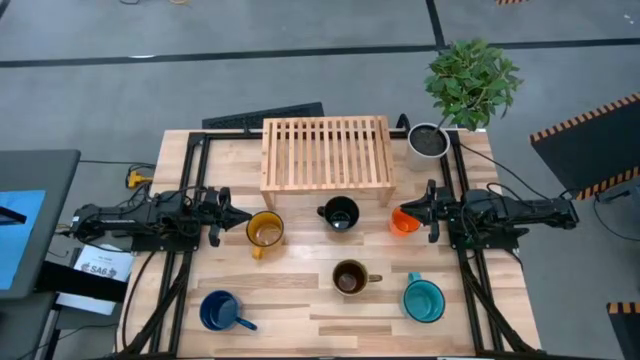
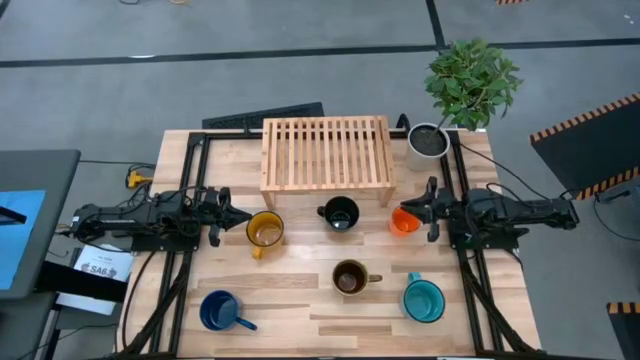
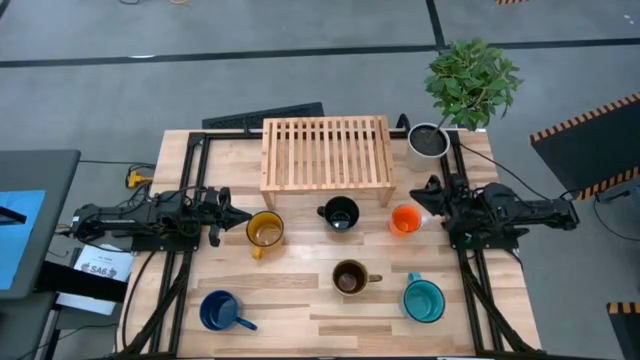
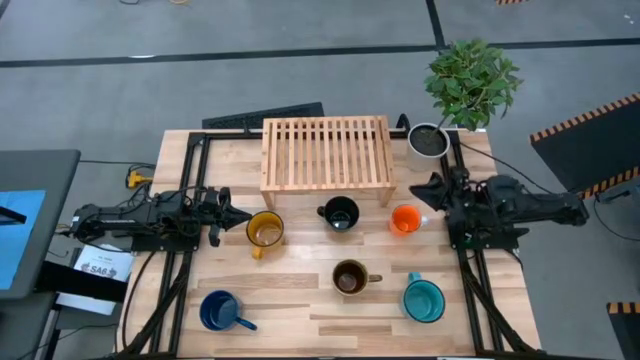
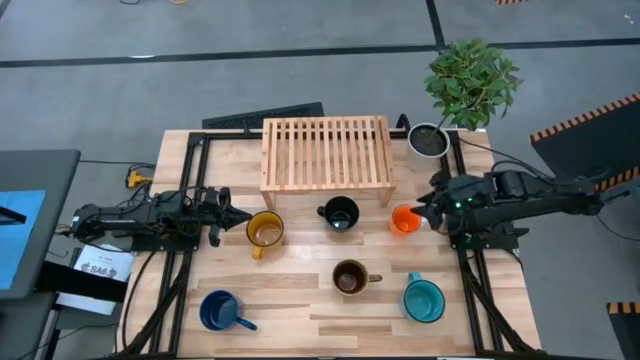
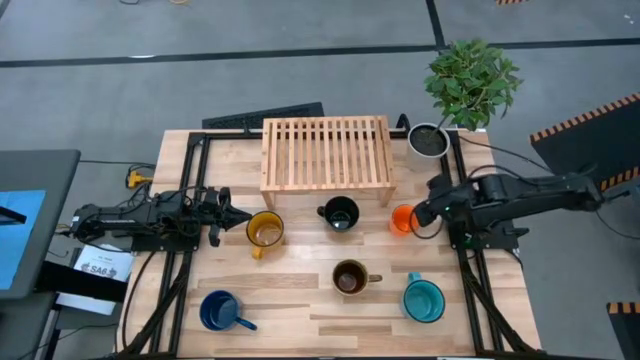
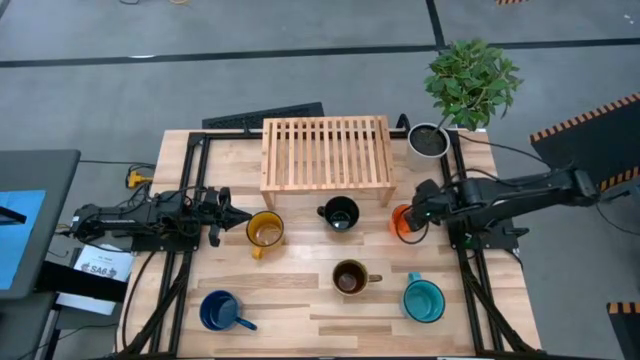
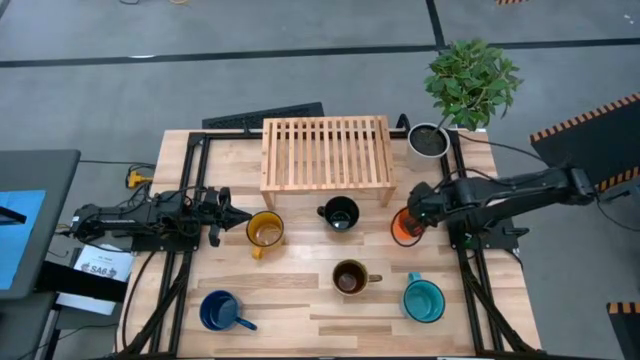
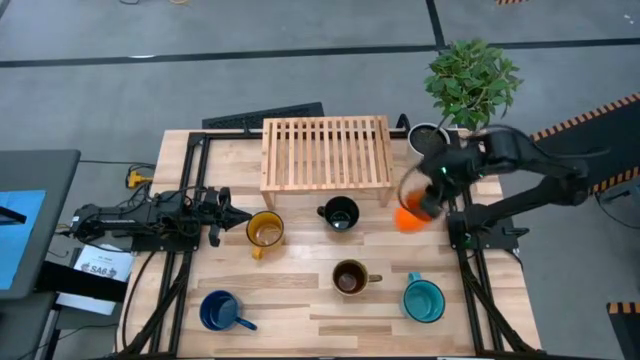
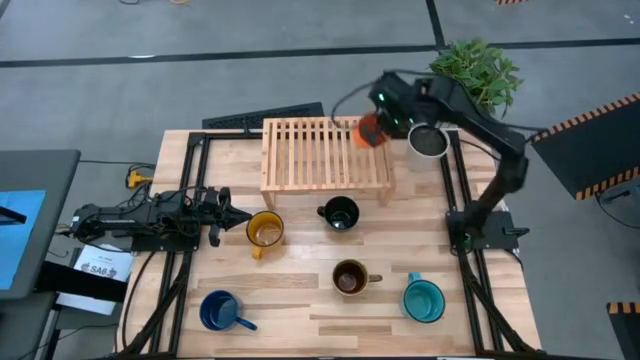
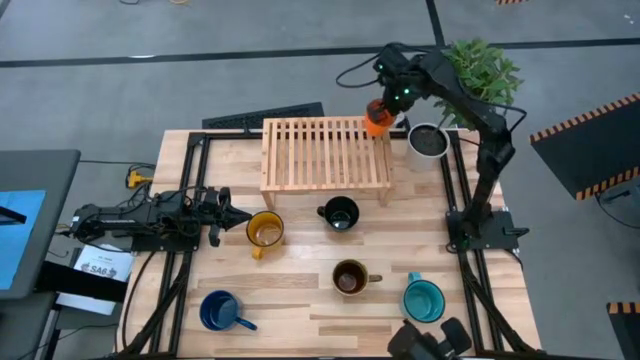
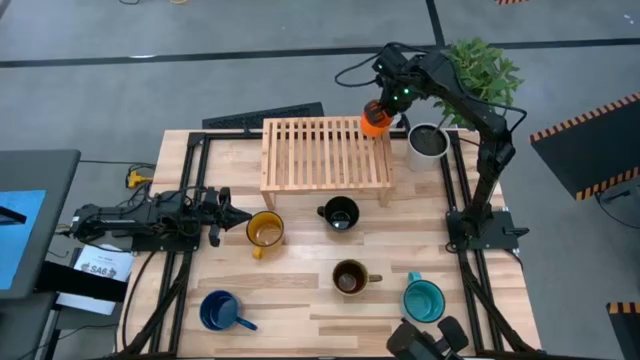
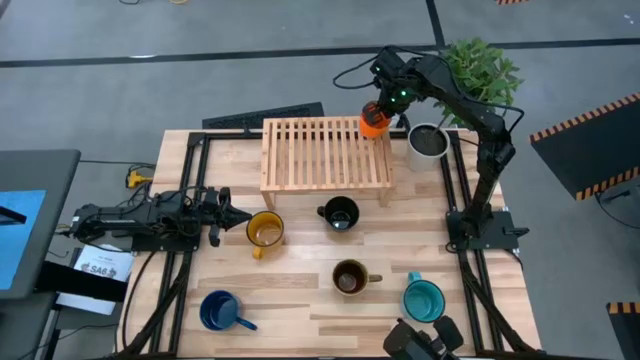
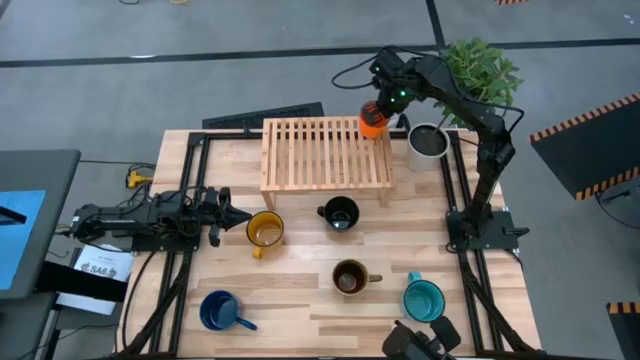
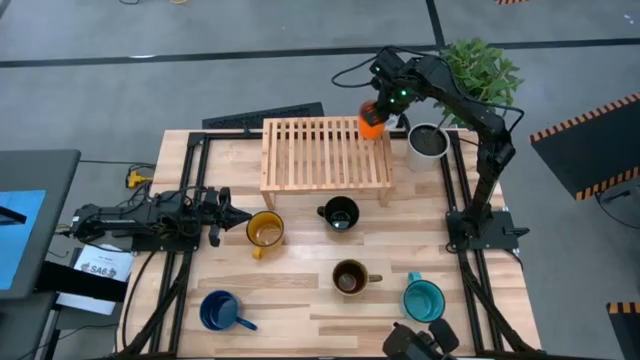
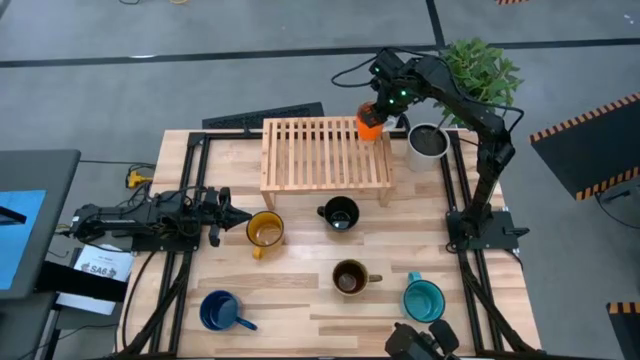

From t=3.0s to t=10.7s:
Task: Place coffee mugs
Put the orange mug on the shelf

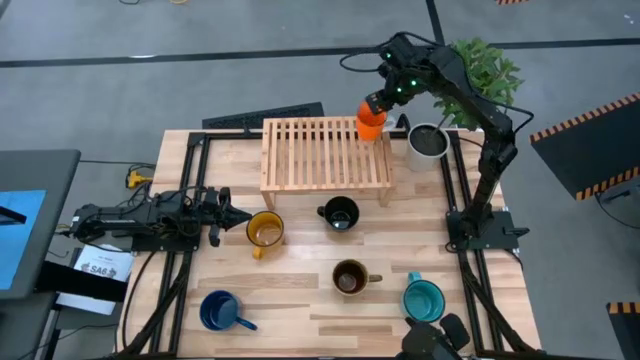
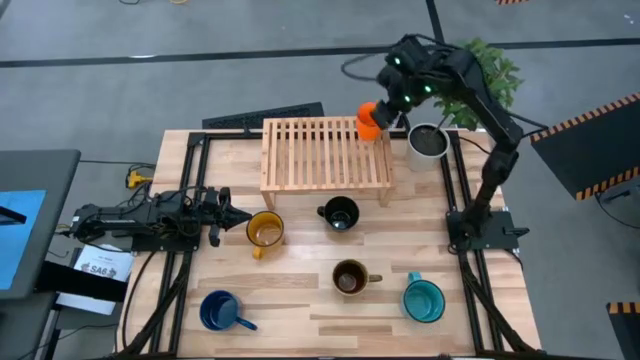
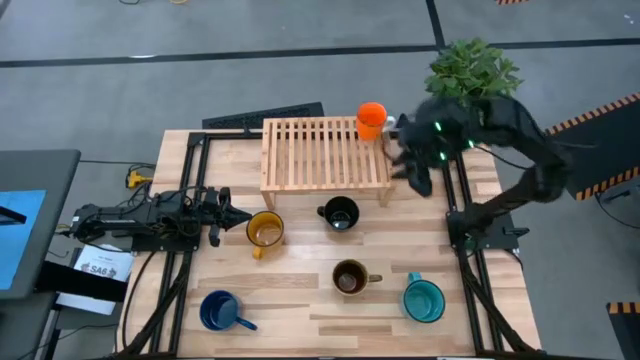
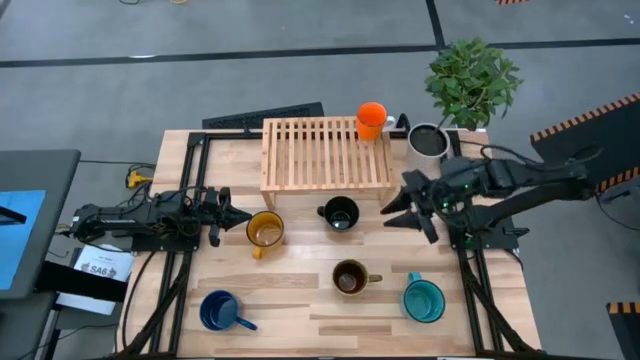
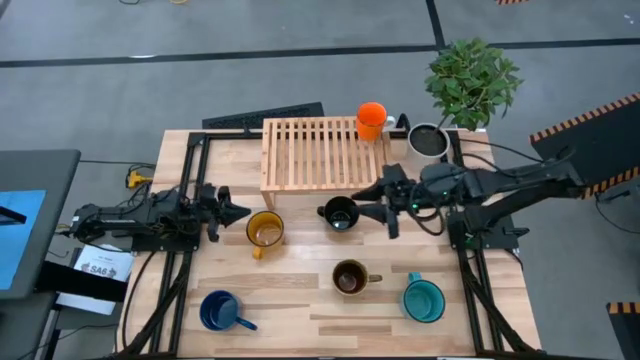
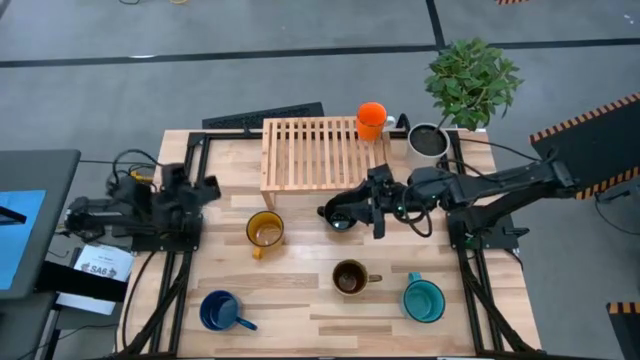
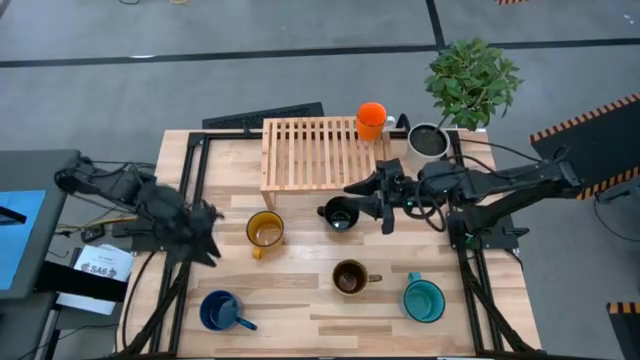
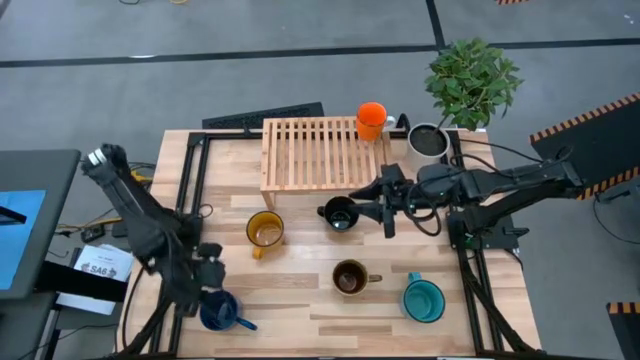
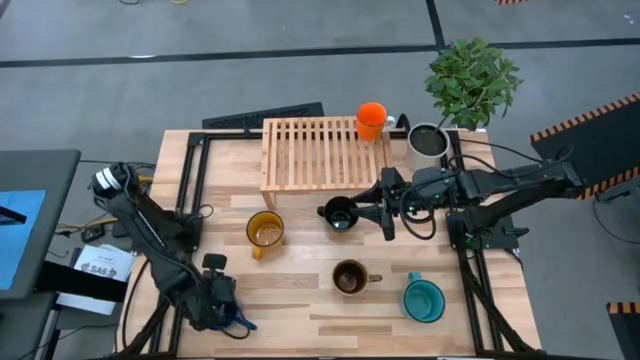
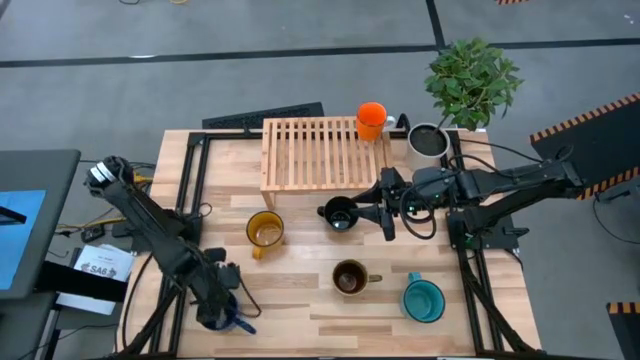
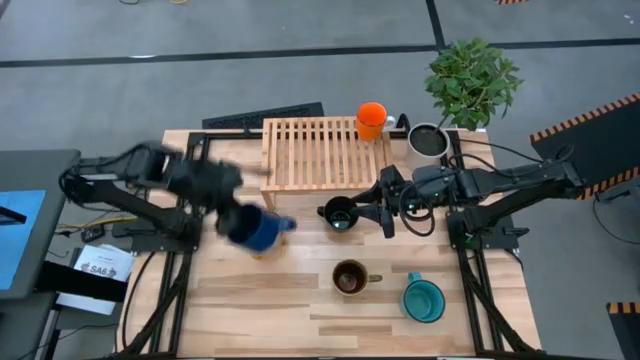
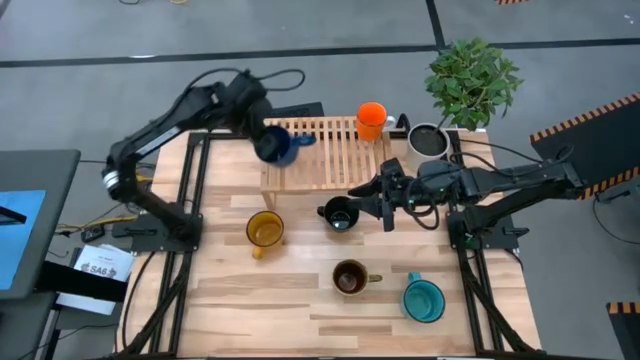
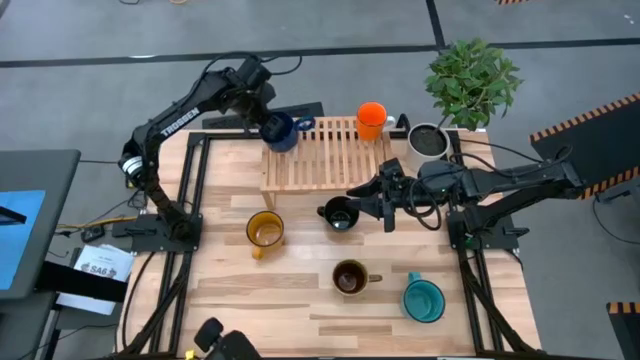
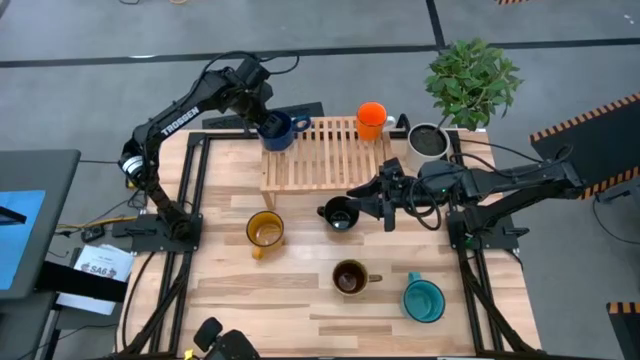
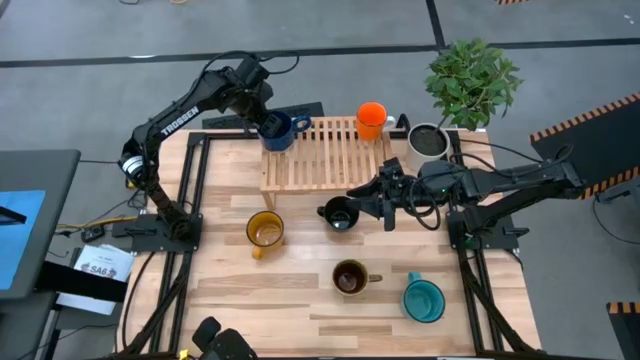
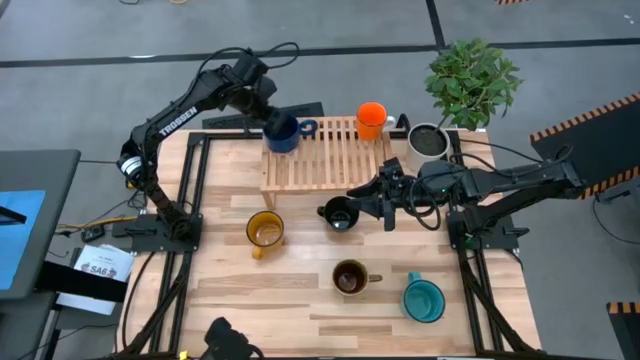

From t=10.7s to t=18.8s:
Put the dark blue mug on the shelf

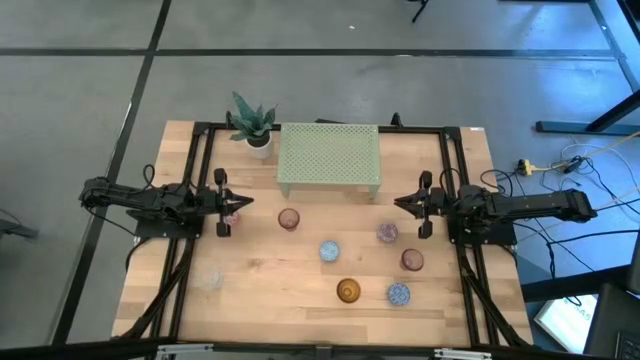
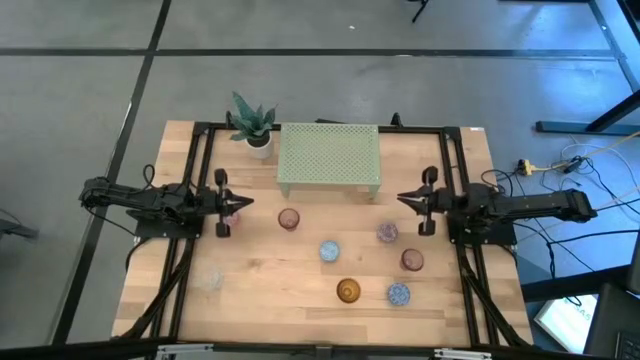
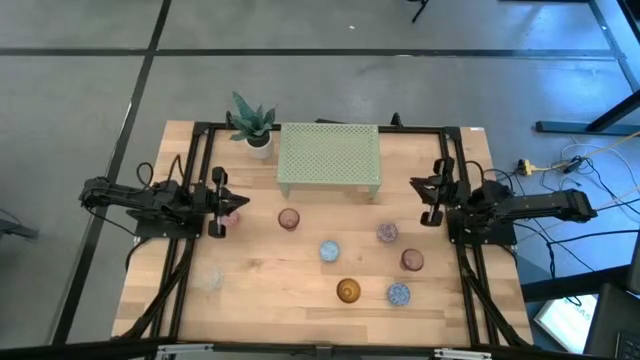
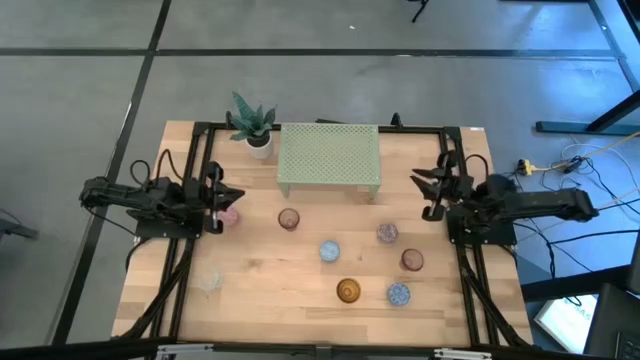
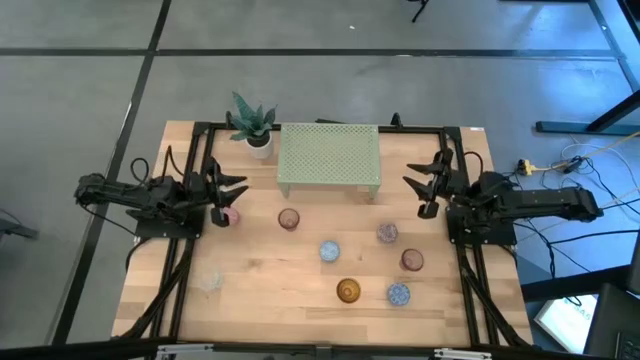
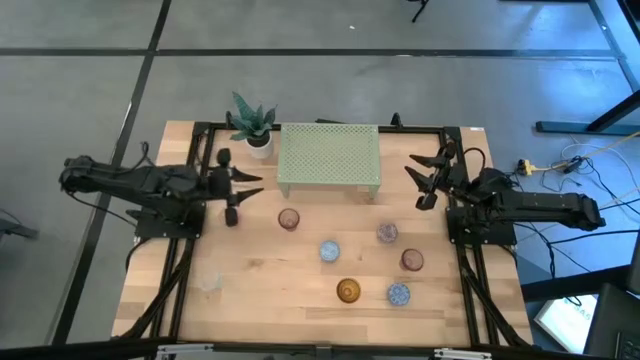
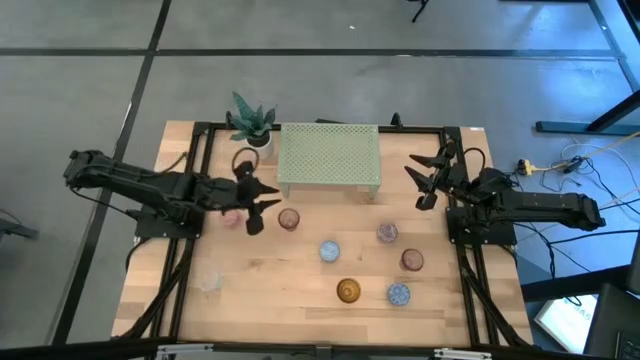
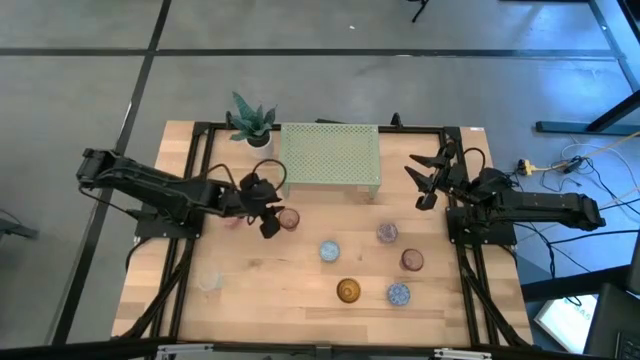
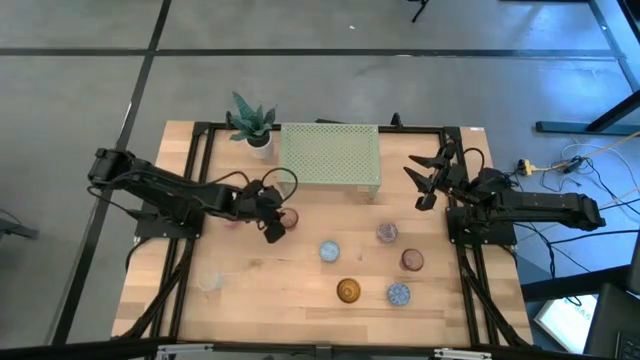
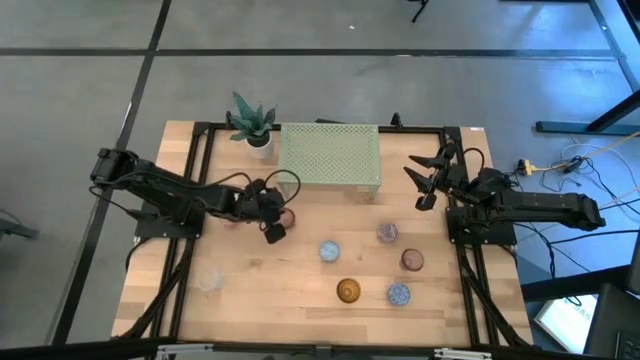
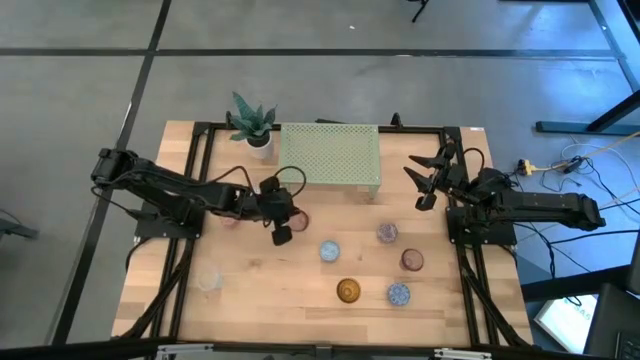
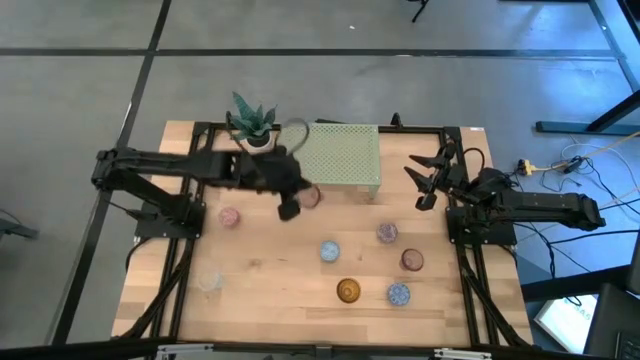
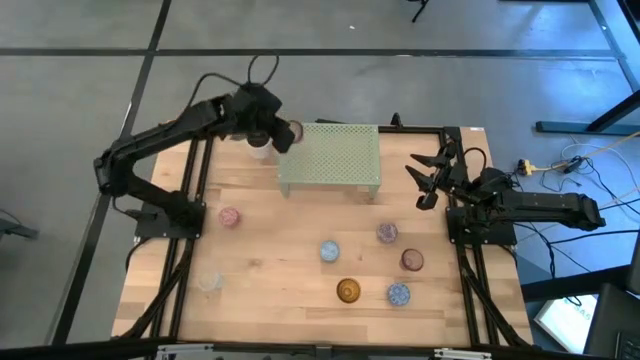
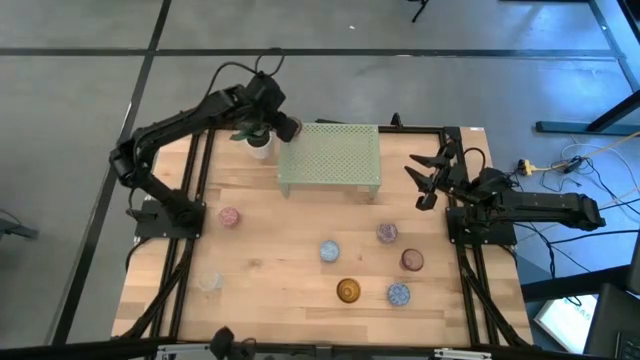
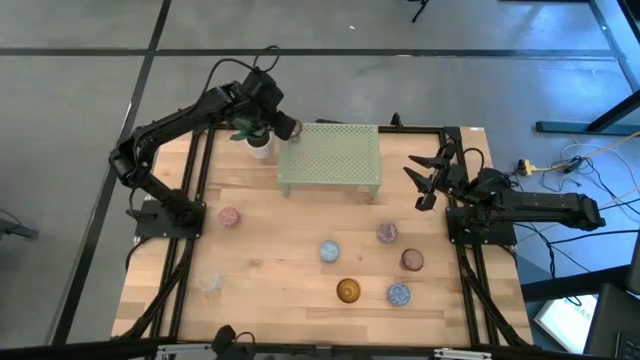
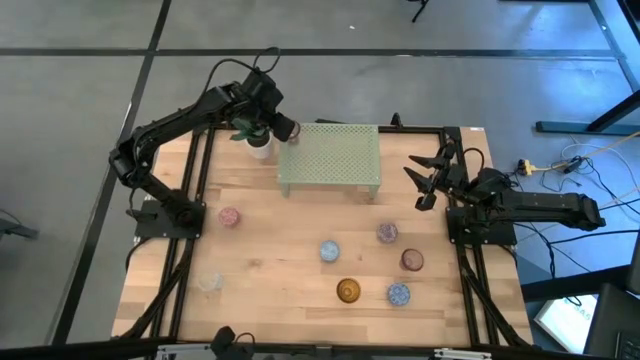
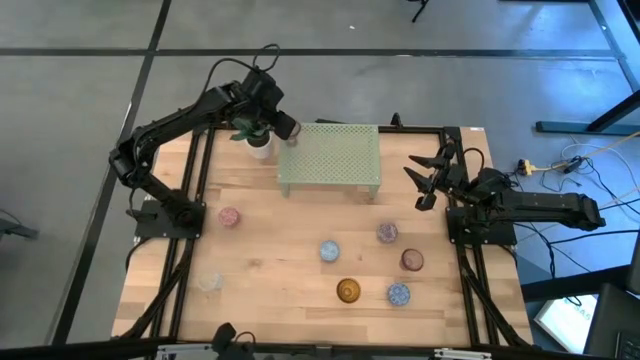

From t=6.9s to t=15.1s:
Task: Pick & Place candle stick holders
Put the left pink glass candle holder on the shelf
